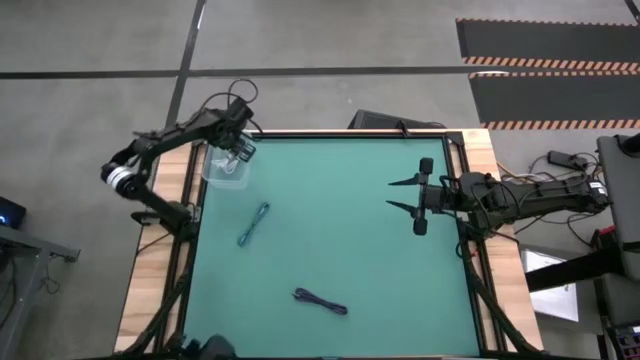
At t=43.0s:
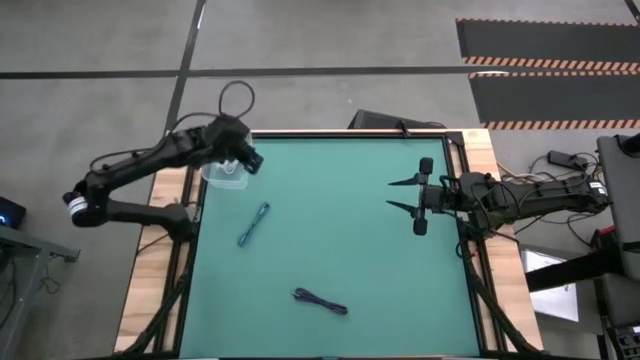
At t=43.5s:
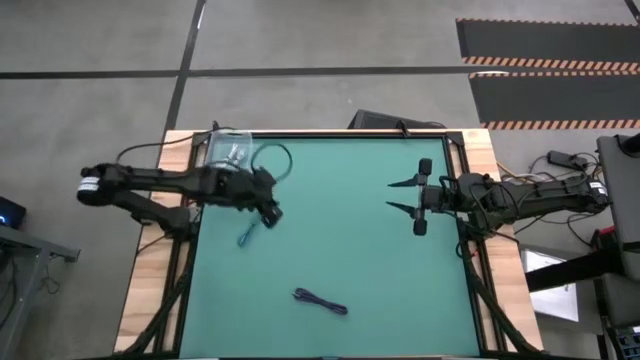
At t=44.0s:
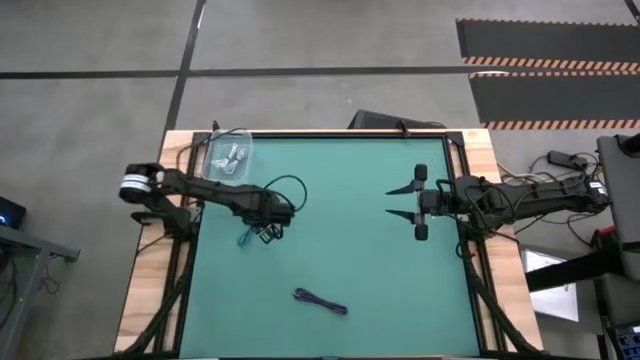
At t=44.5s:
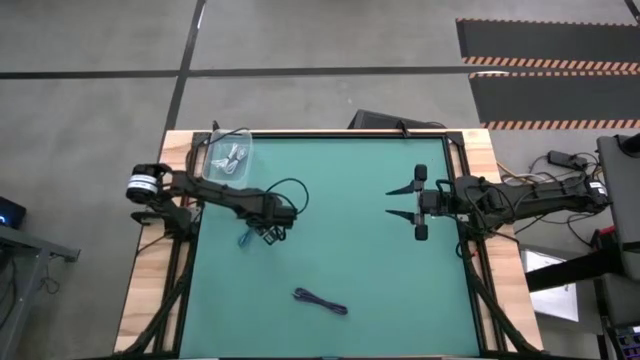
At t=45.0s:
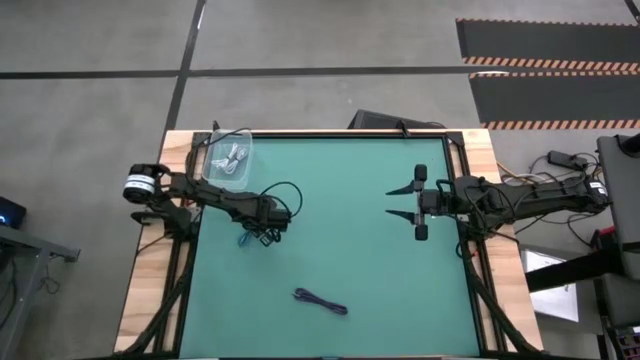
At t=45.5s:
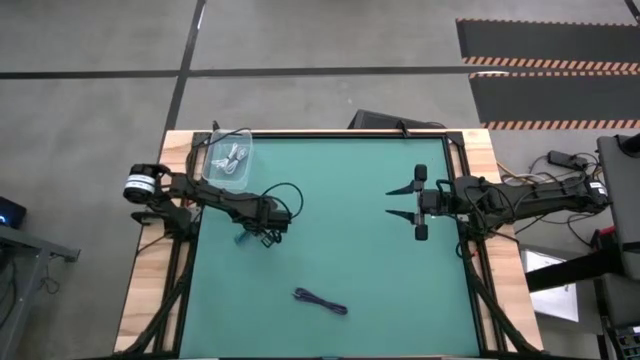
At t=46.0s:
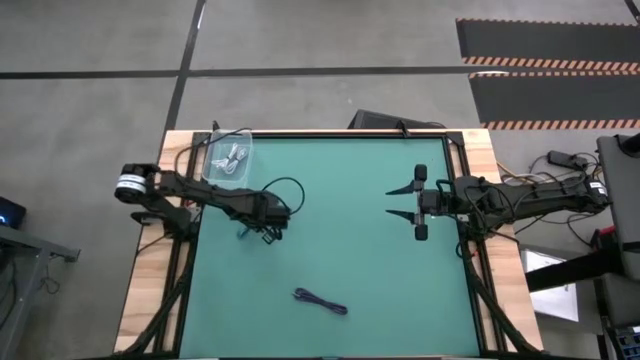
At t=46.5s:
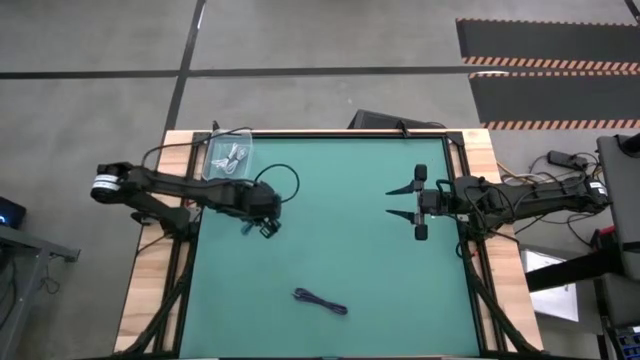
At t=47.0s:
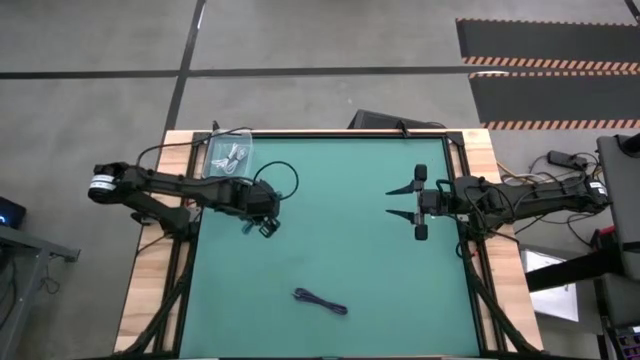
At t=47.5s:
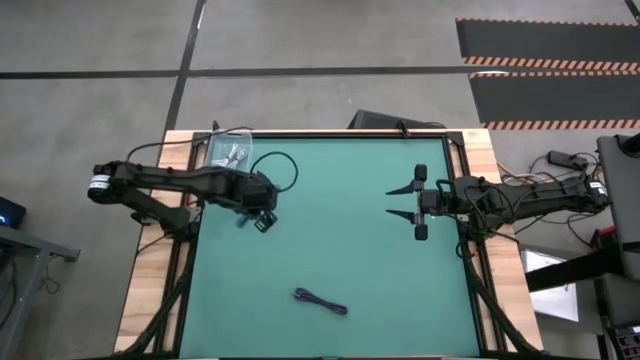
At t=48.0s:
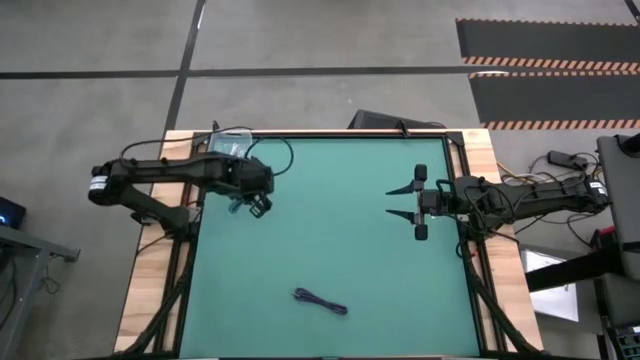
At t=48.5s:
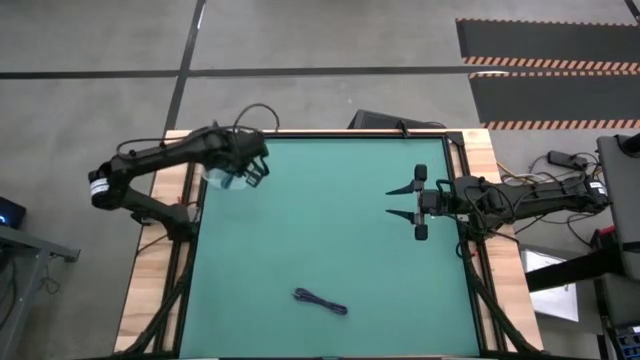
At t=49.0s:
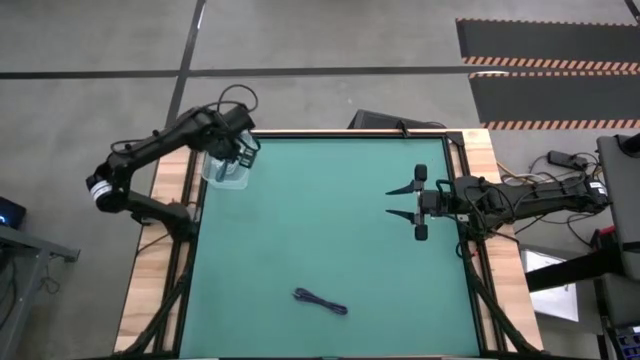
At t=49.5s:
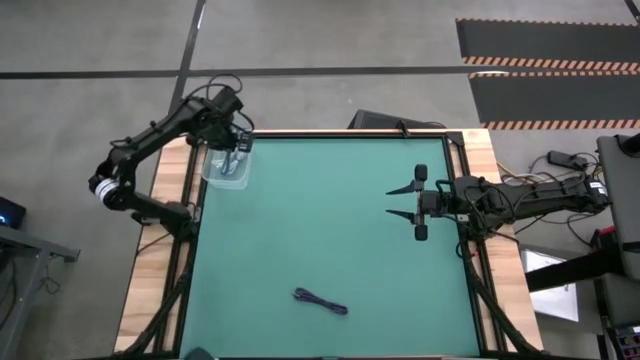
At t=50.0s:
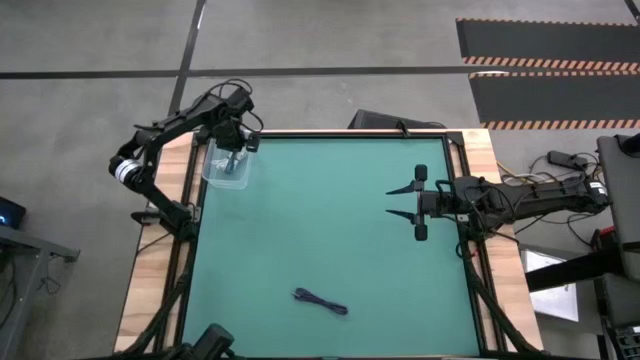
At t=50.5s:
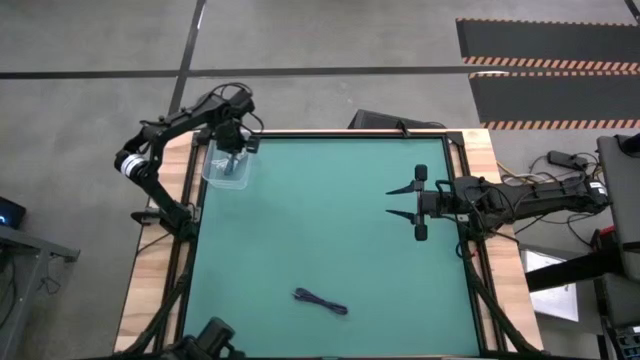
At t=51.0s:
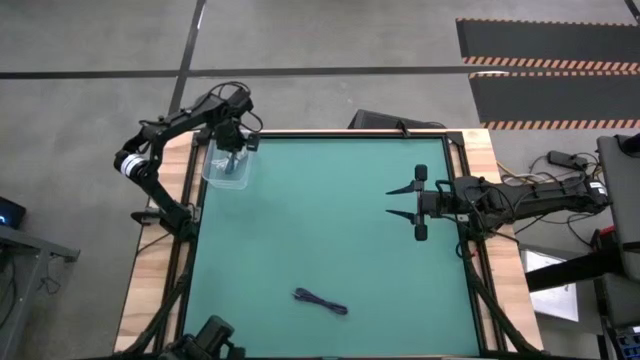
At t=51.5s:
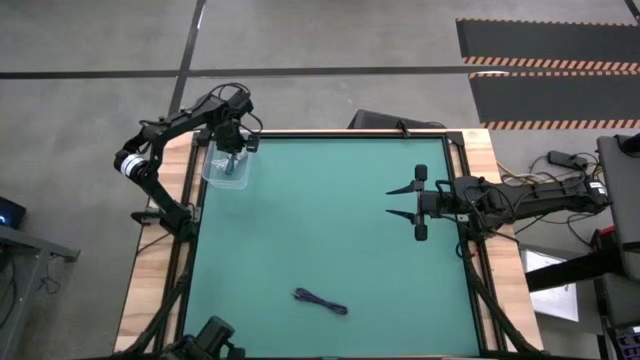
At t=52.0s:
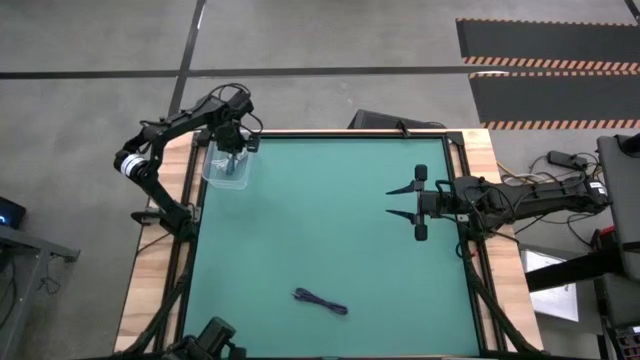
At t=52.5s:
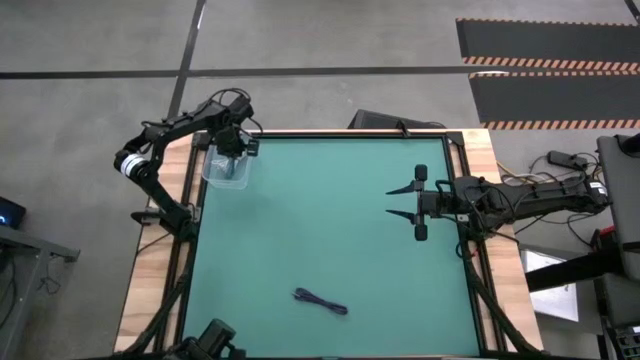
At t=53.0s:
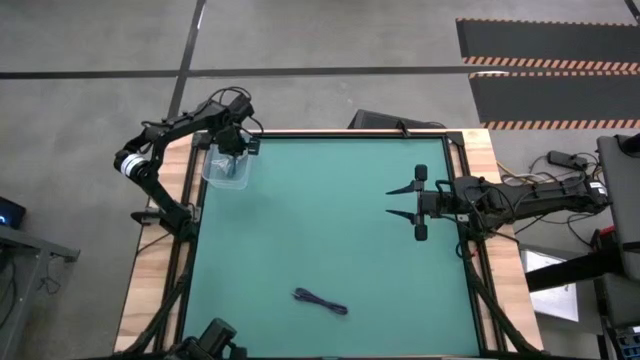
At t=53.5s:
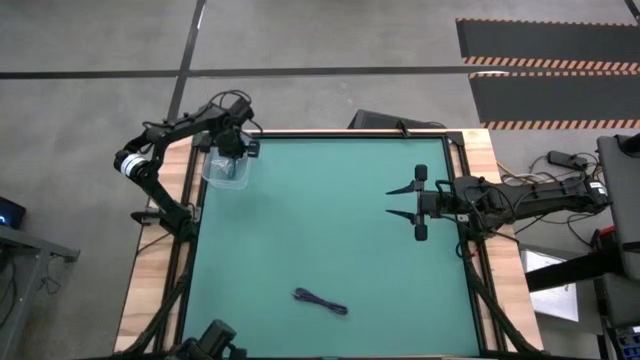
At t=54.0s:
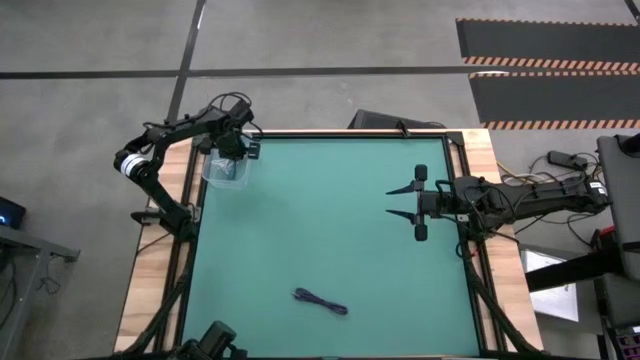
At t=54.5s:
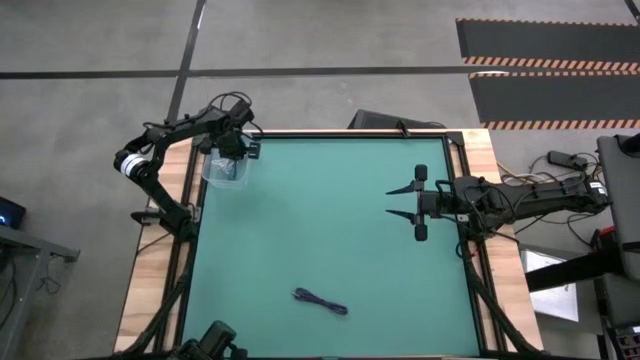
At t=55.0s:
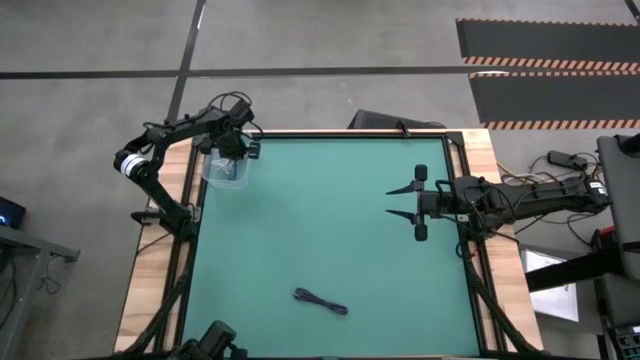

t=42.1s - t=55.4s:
Task: Pick and place USB-C Cables
Put the blue charger cable into the transparent bin

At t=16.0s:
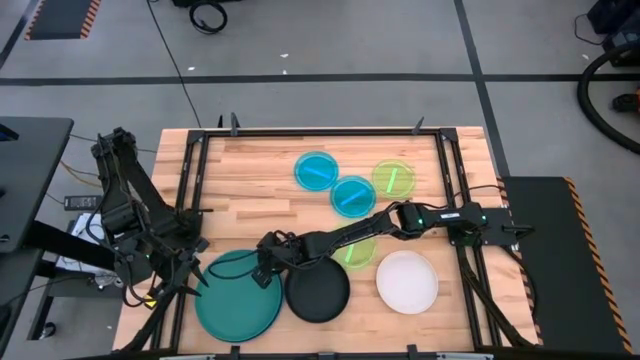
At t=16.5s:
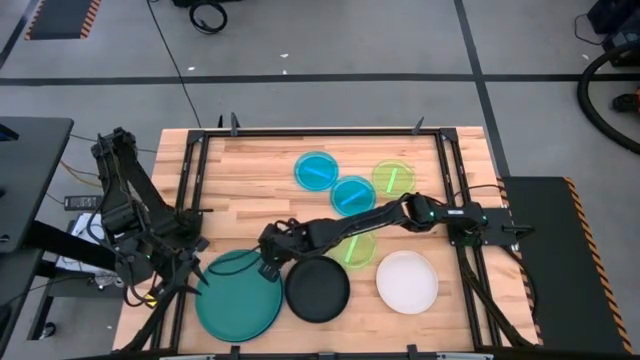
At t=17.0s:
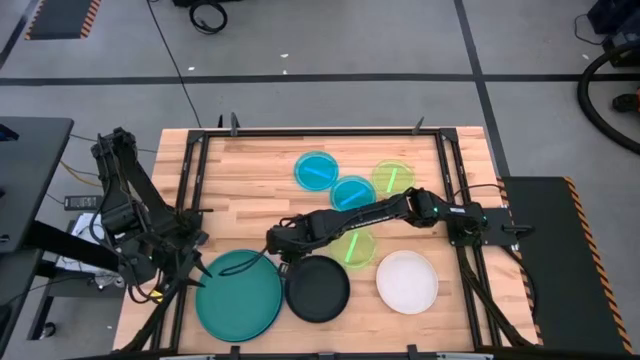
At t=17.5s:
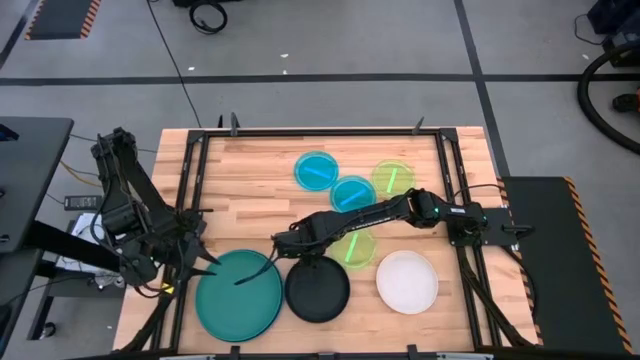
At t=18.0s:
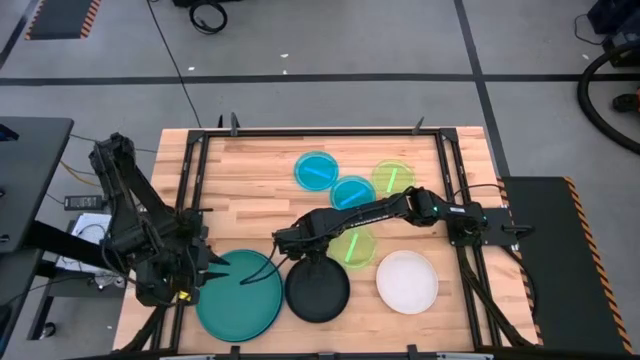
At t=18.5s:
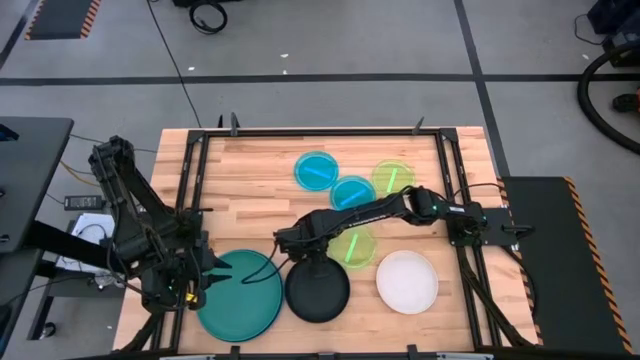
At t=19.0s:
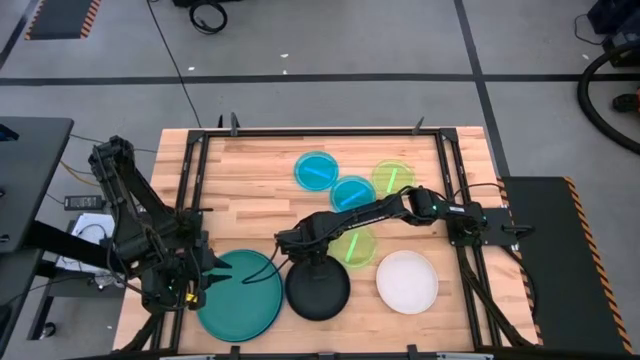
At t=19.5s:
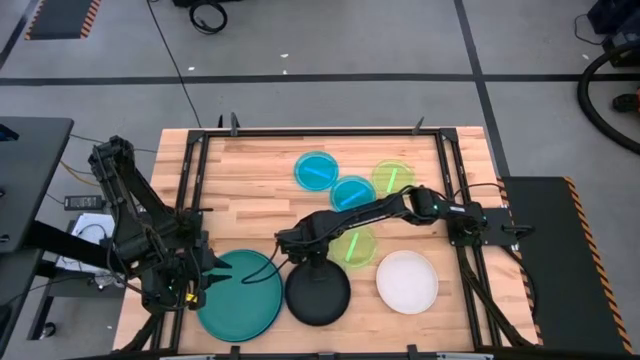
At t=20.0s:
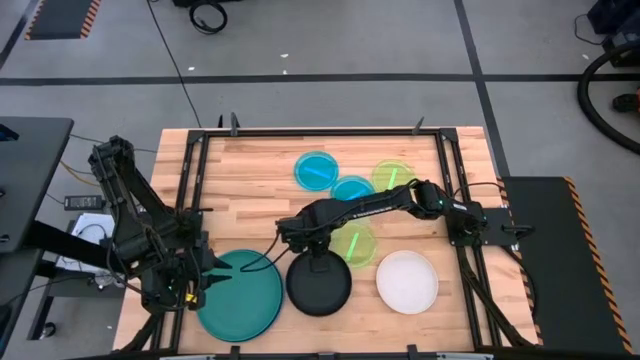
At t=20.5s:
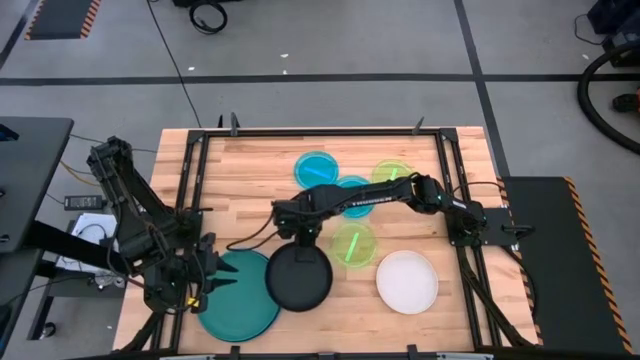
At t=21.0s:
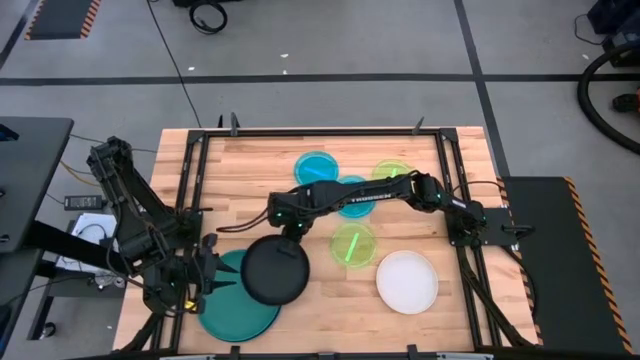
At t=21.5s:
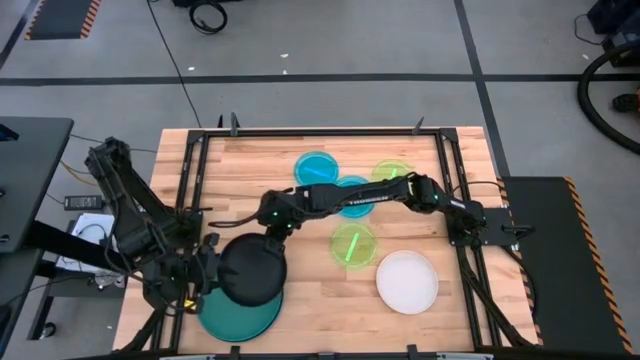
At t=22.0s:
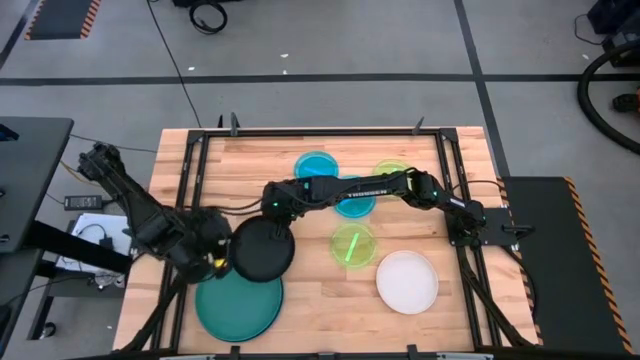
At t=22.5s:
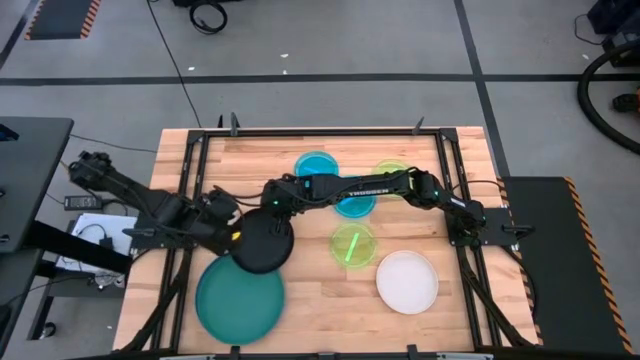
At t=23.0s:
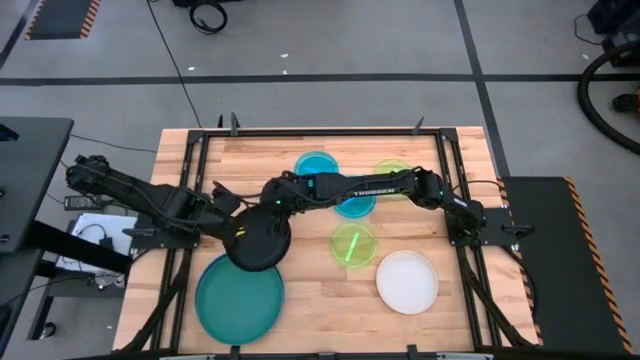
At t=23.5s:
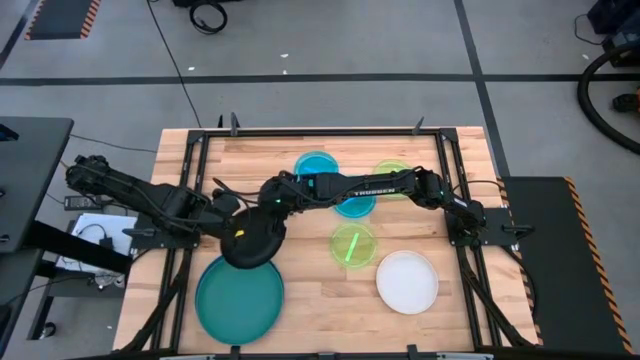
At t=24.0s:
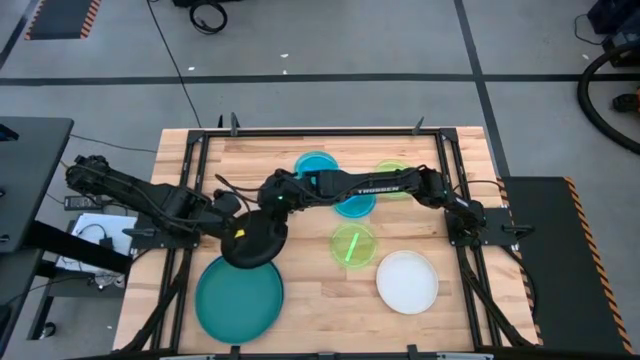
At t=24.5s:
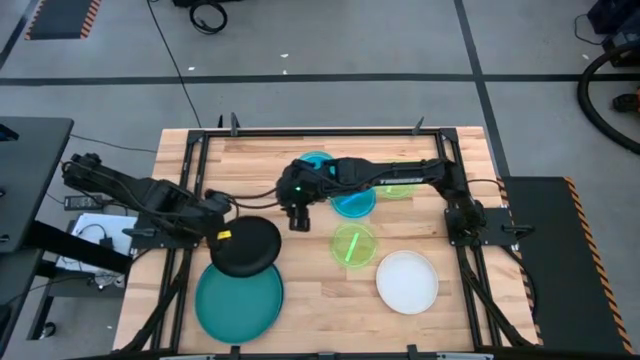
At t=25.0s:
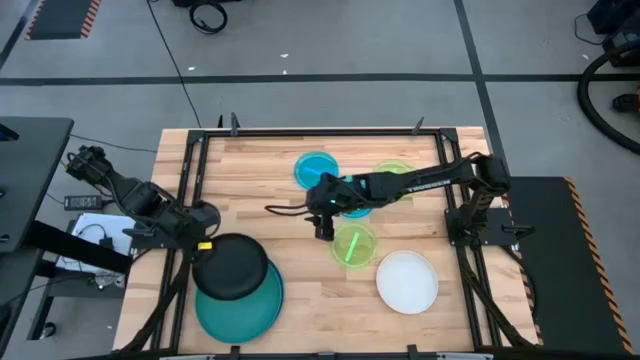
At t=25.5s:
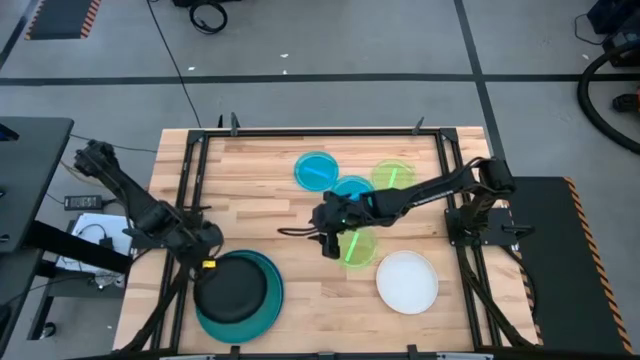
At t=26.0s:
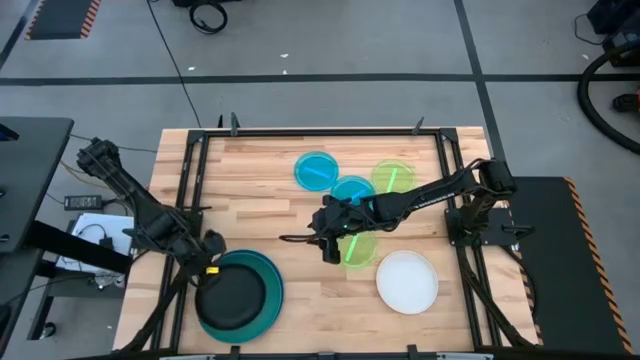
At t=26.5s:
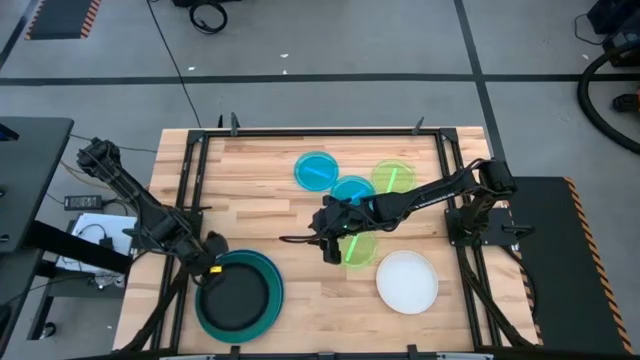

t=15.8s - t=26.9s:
Task: Stack plastic plates
Stack the black plate on top of the green plate
